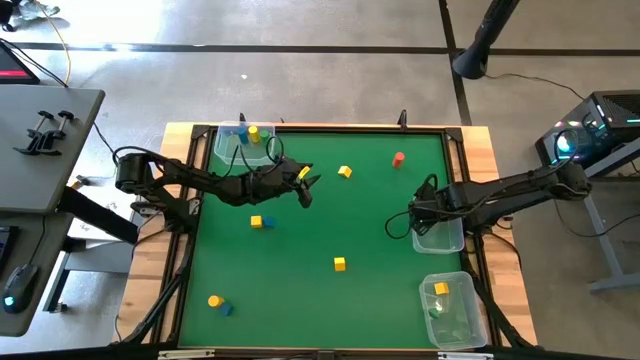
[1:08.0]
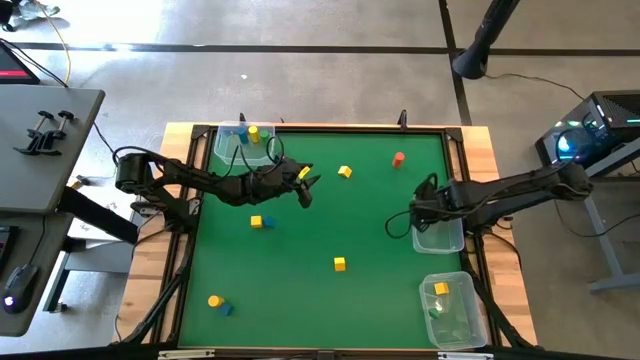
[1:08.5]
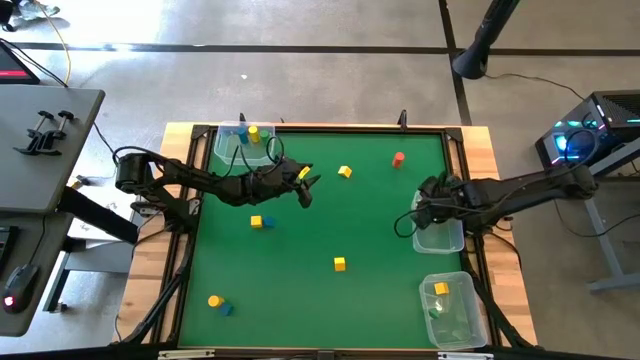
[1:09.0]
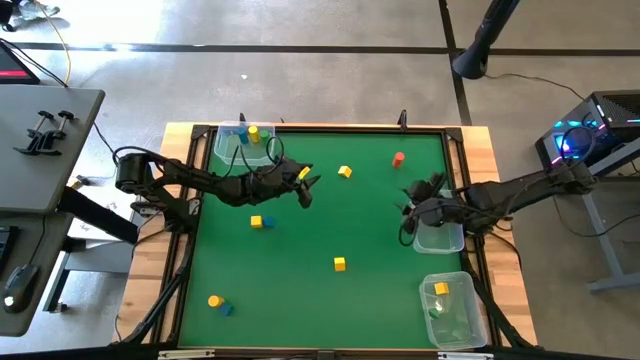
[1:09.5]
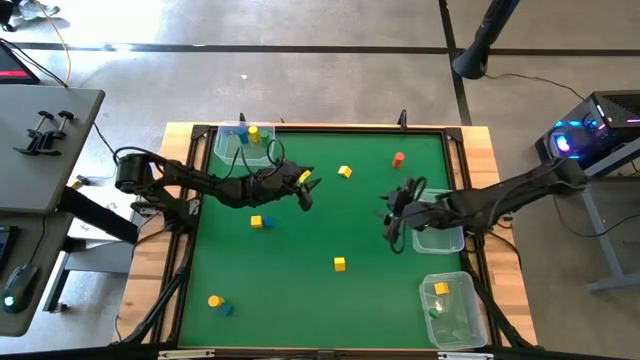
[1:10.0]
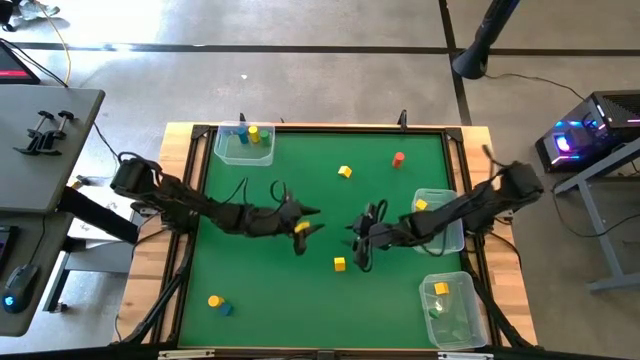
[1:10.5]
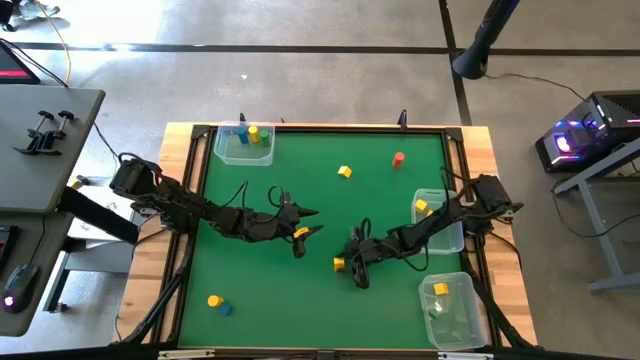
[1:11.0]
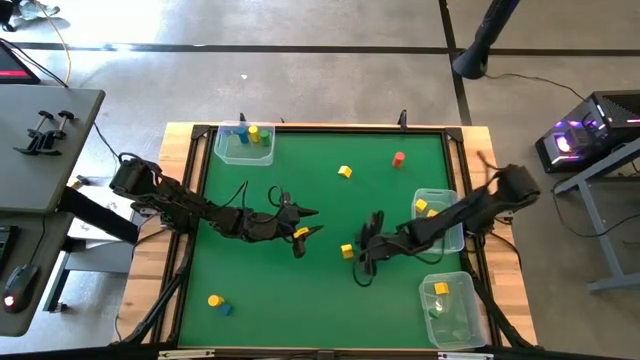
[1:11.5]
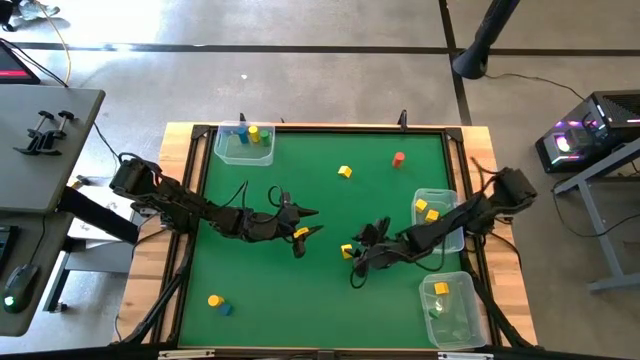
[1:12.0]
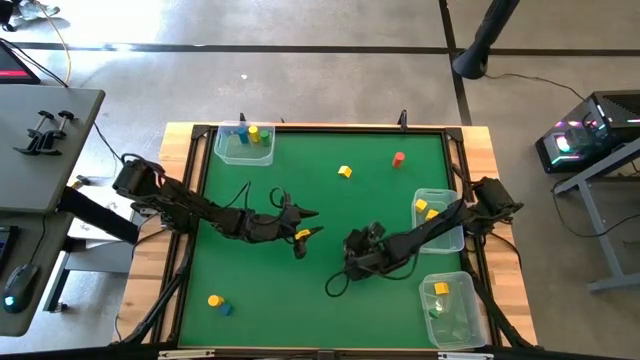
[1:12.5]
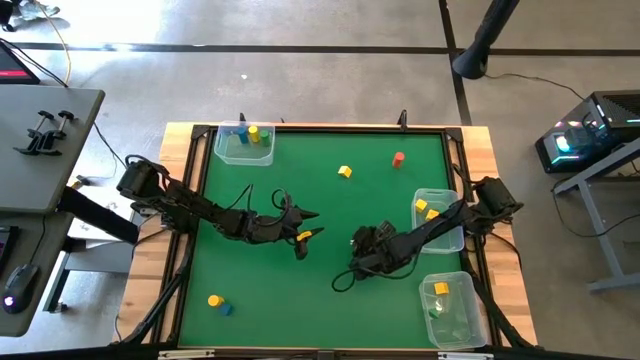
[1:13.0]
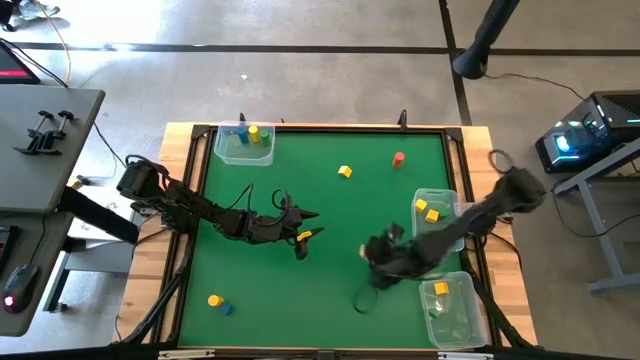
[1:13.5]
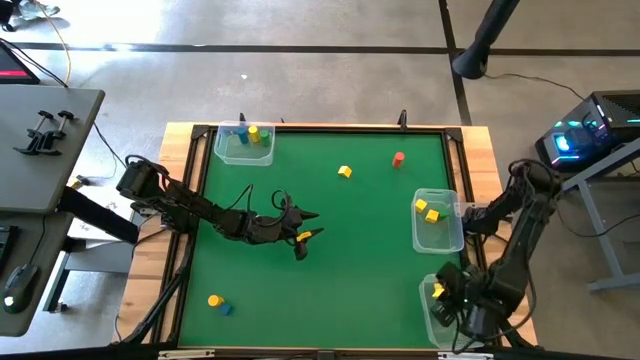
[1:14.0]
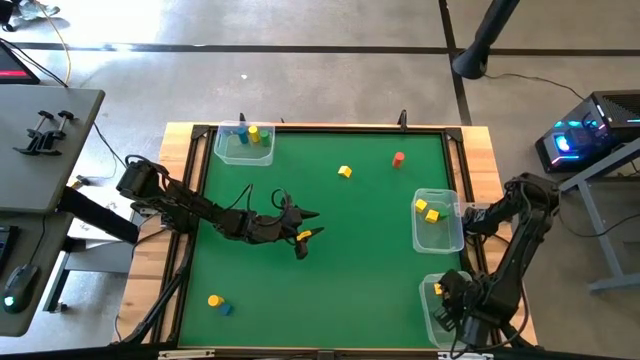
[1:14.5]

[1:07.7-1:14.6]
Task: Sort blocks by size
Put the bottom yellow triangular block into the bottom transparent bin

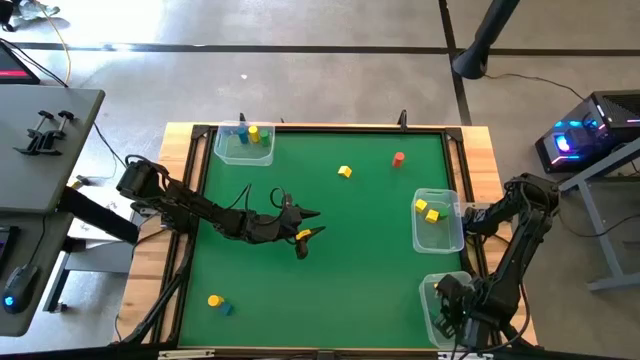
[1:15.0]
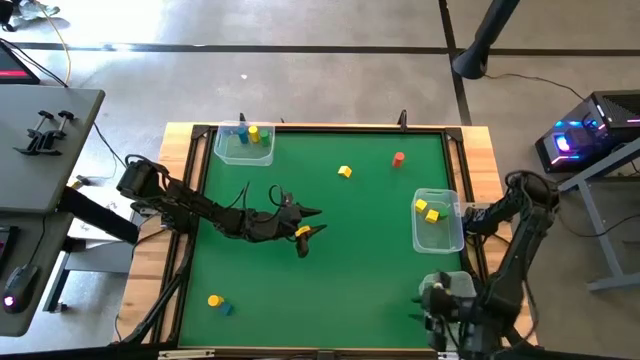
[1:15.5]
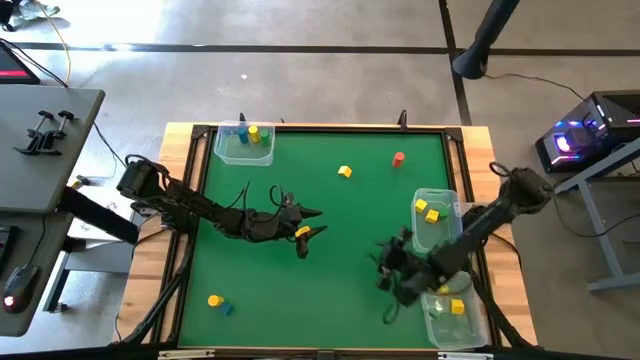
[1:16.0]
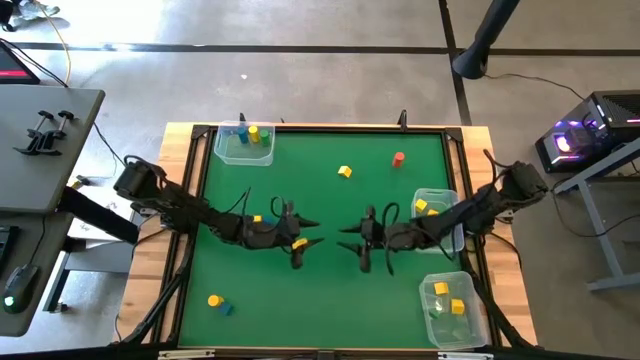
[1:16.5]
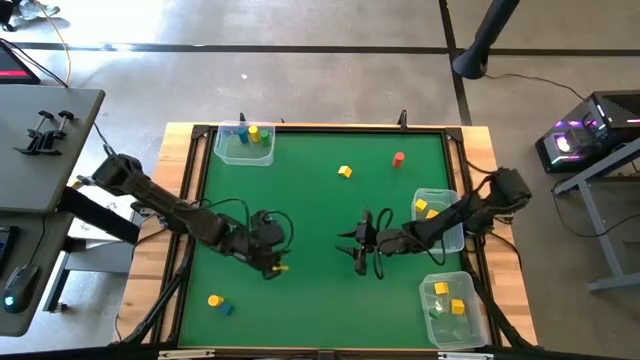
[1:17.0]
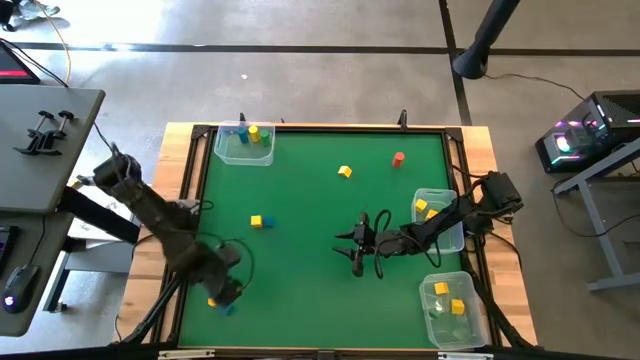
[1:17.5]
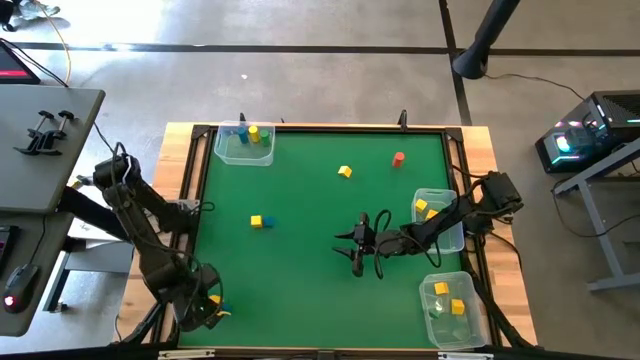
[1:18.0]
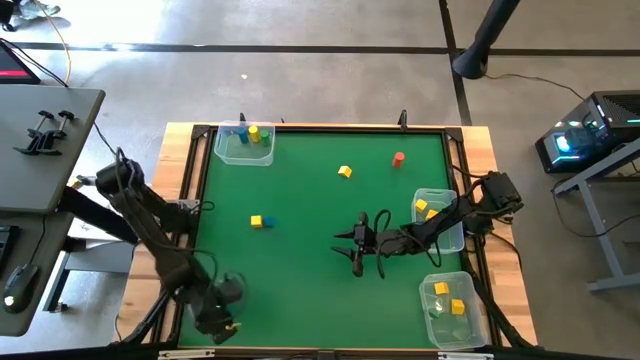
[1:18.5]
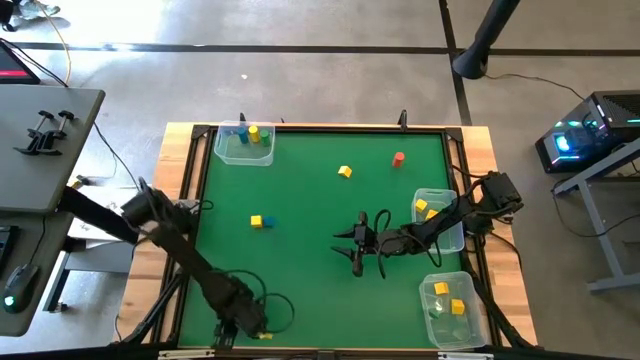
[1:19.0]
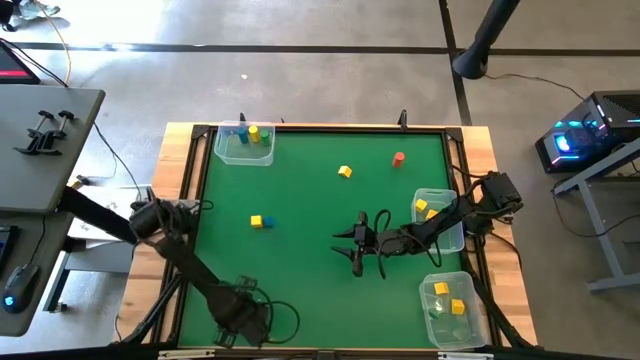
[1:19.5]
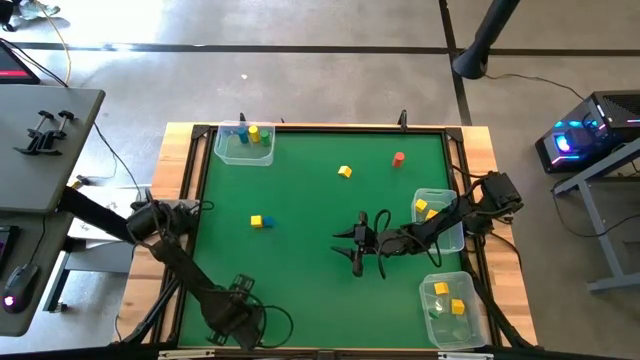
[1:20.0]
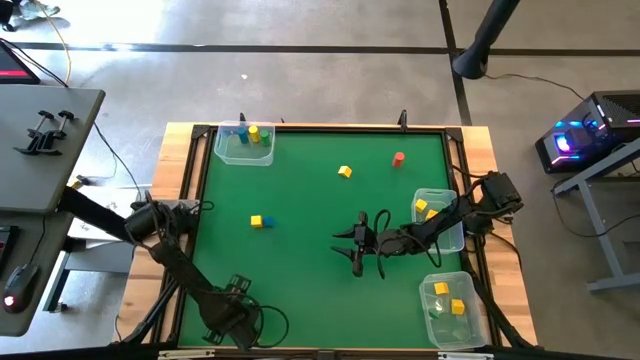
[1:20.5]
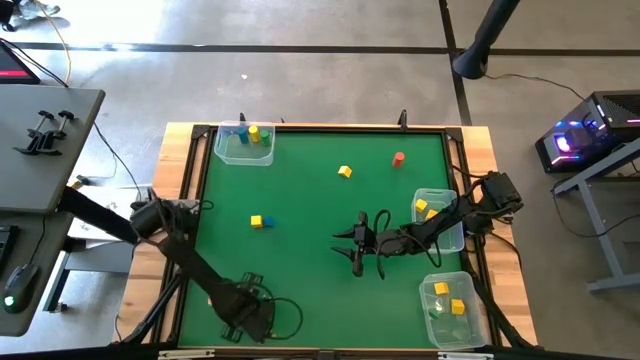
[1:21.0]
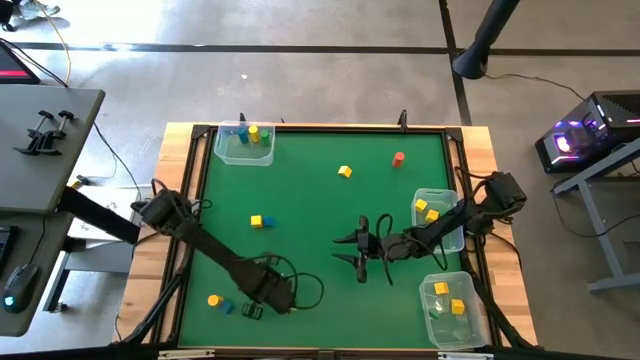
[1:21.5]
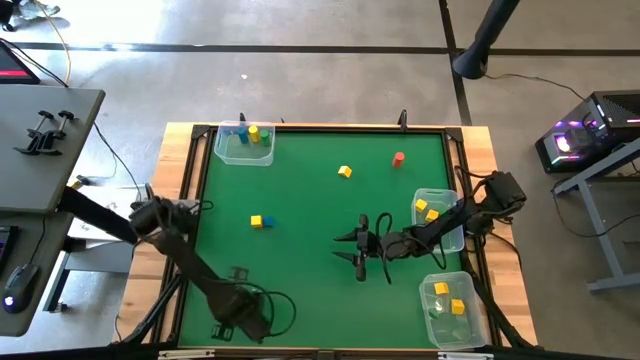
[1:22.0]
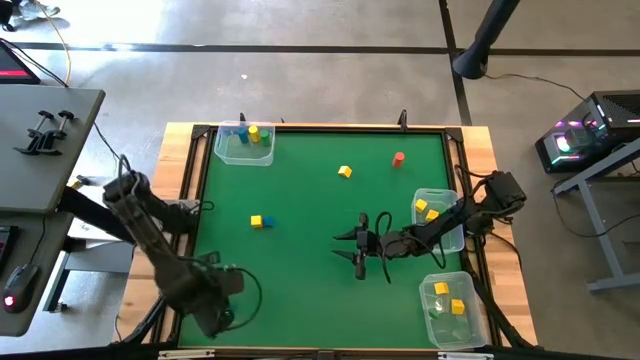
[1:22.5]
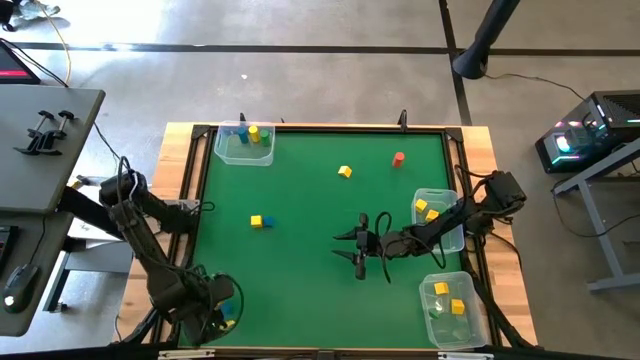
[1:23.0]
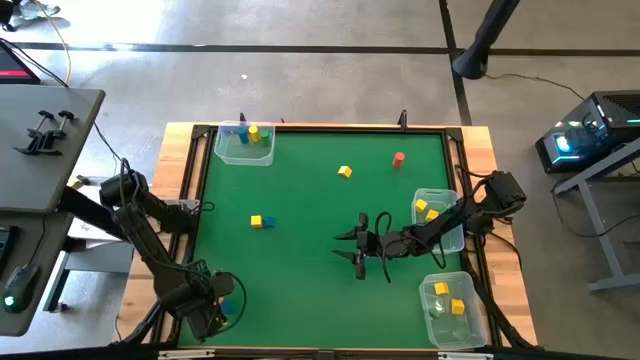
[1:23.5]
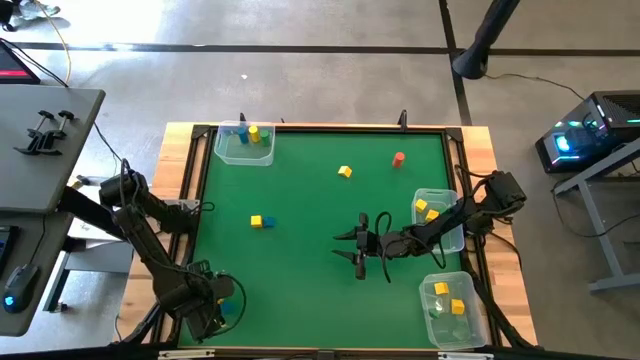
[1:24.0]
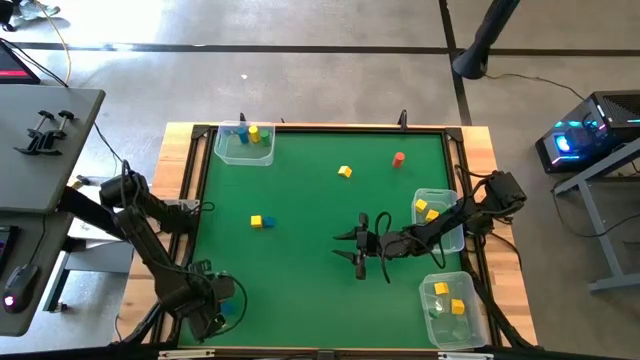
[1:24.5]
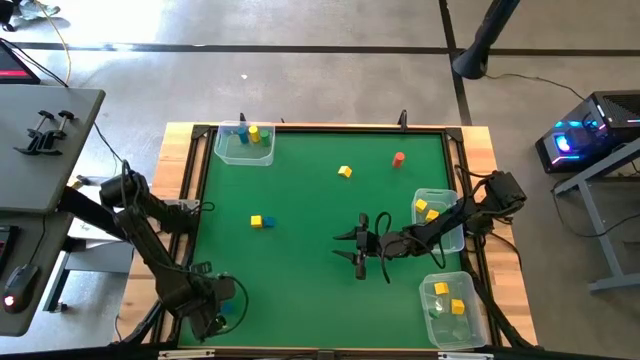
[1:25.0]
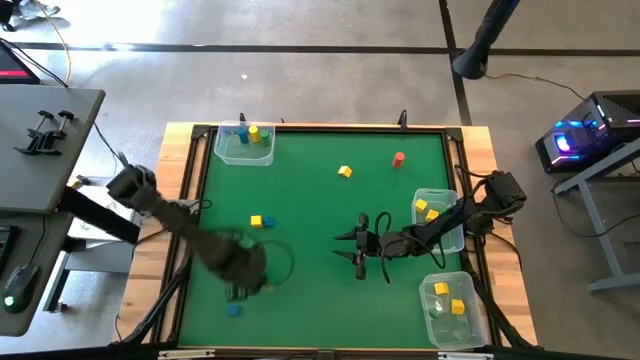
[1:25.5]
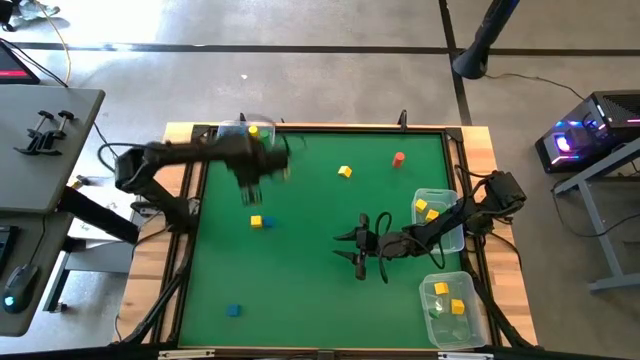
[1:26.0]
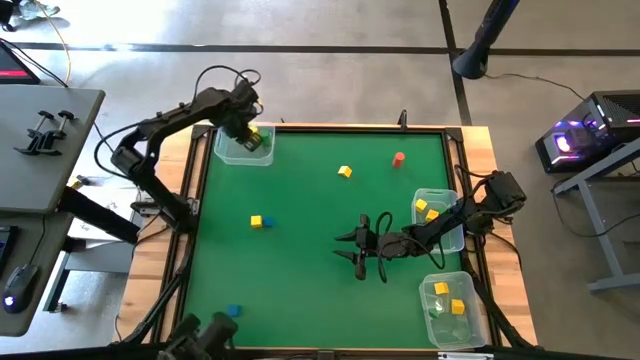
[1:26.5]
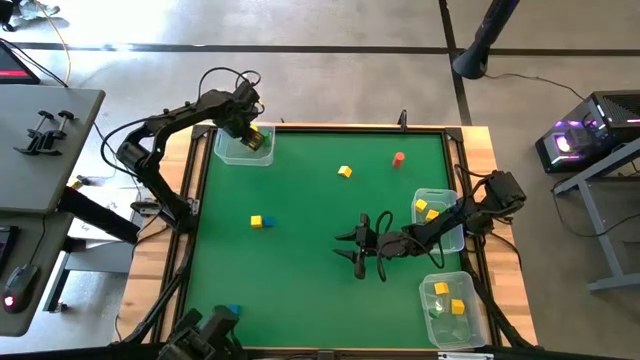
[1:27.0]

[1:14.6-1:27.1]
Put the yellow cylindrical block into the top transparent bin
